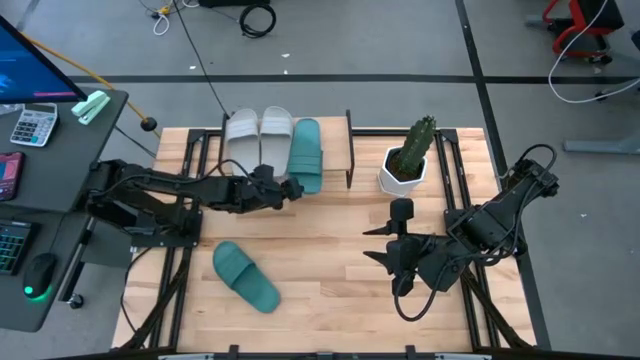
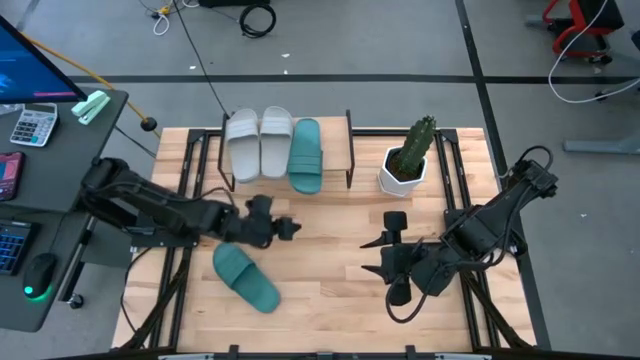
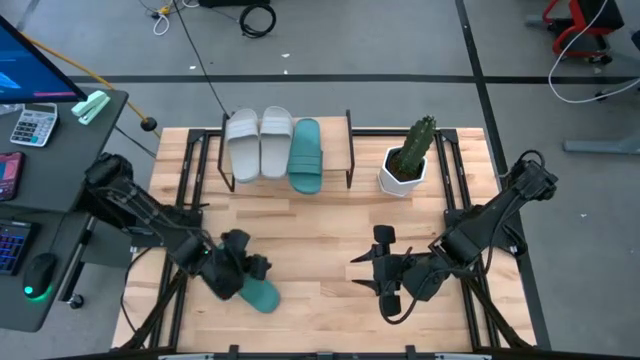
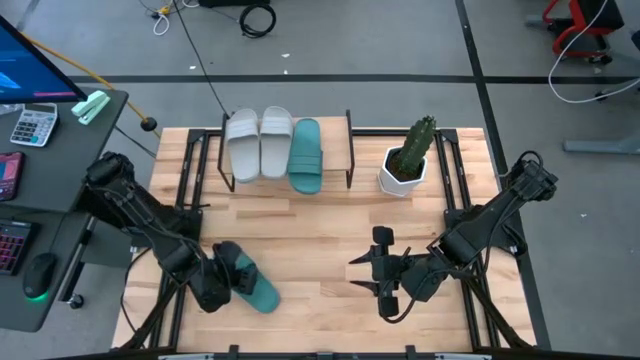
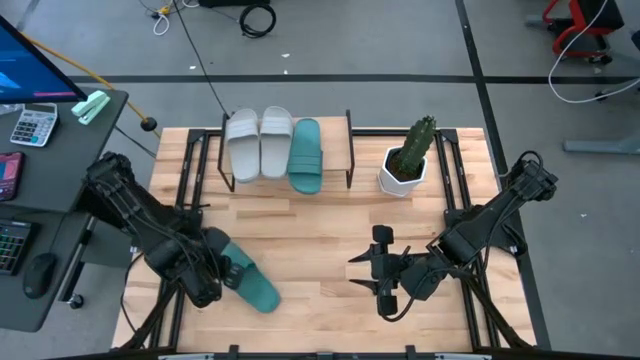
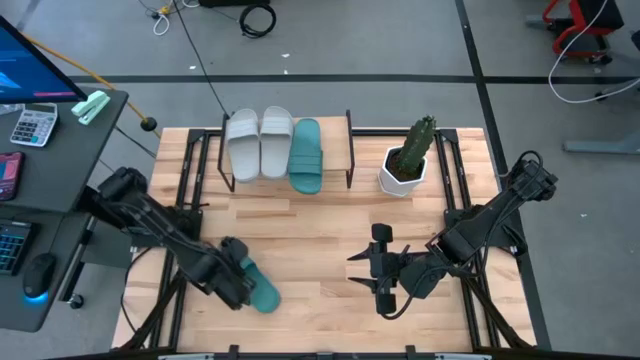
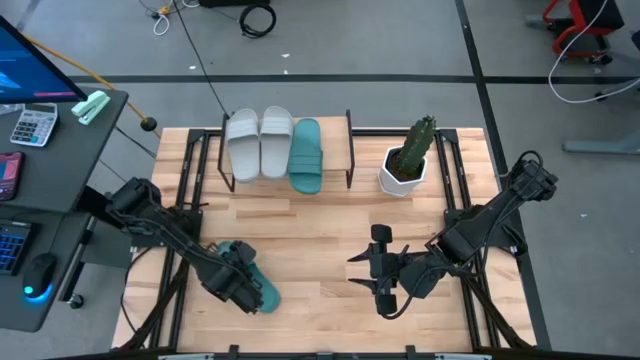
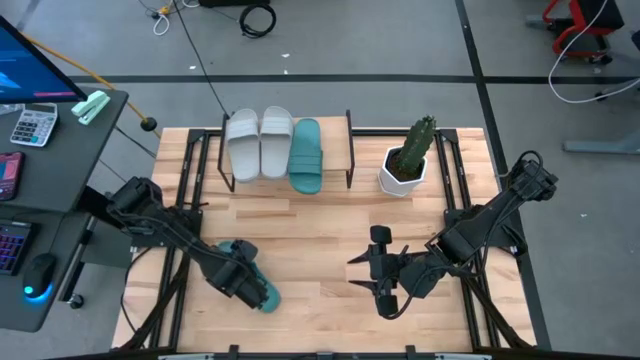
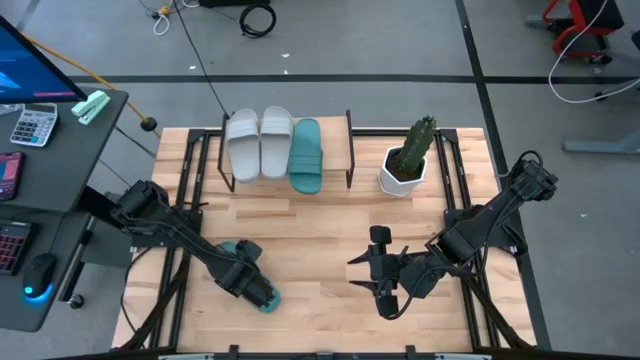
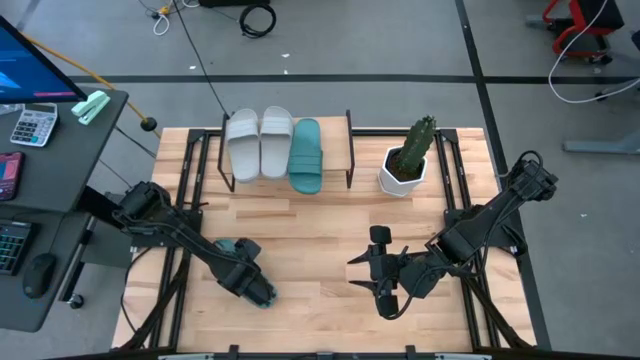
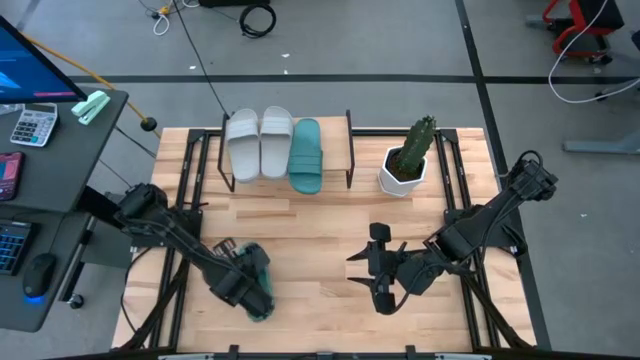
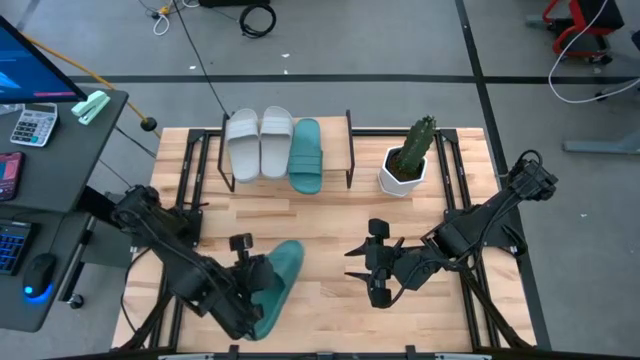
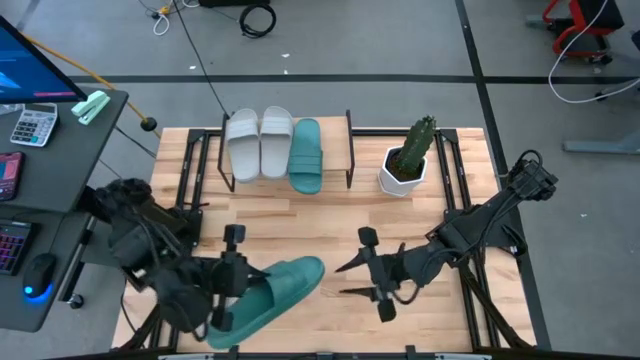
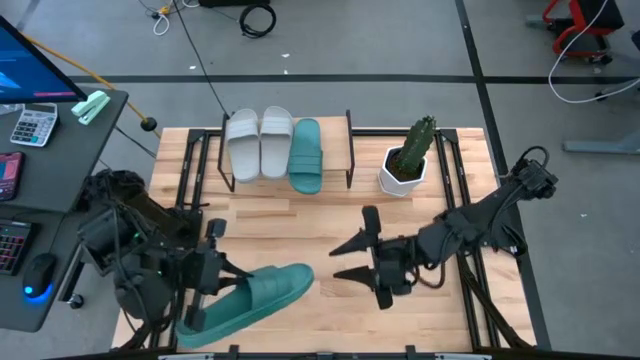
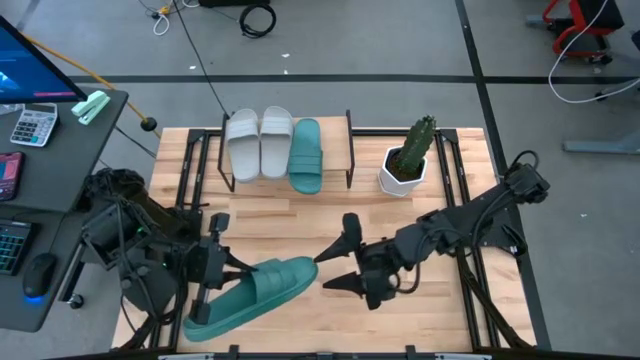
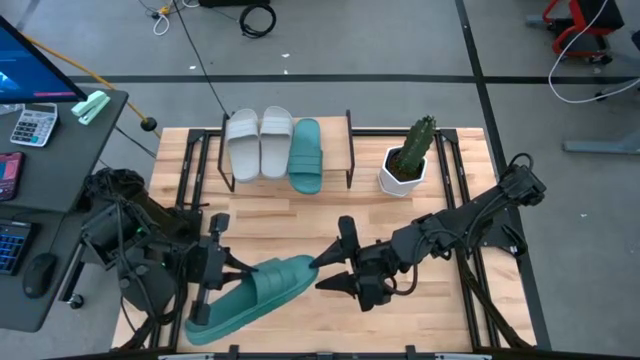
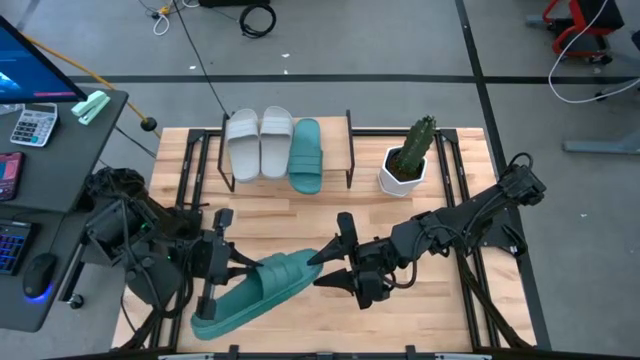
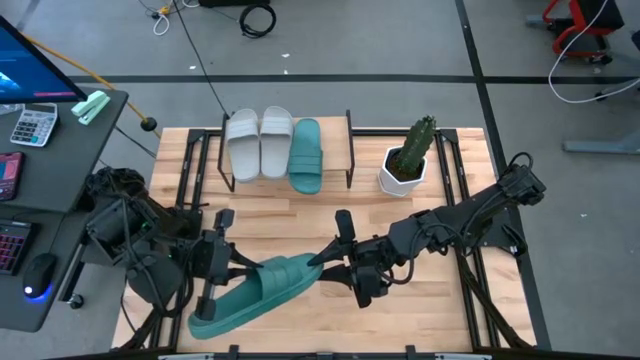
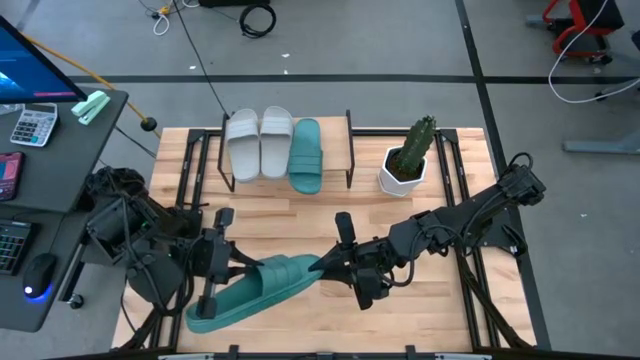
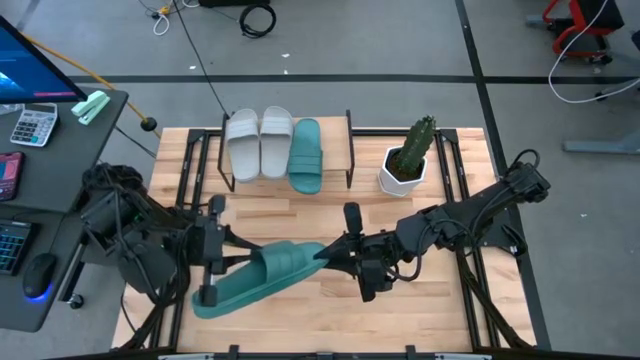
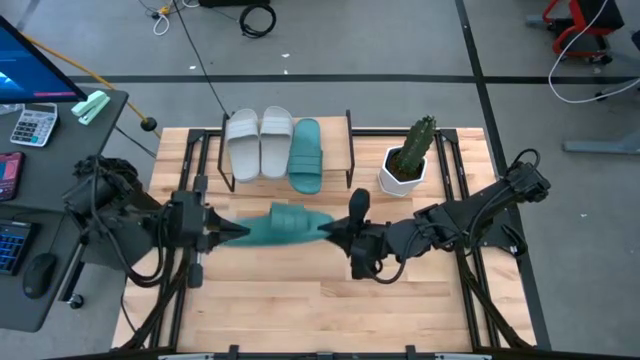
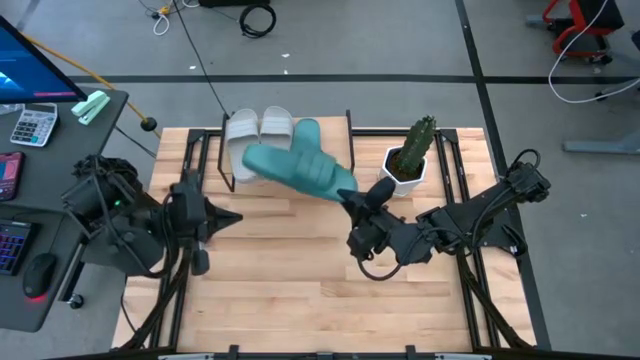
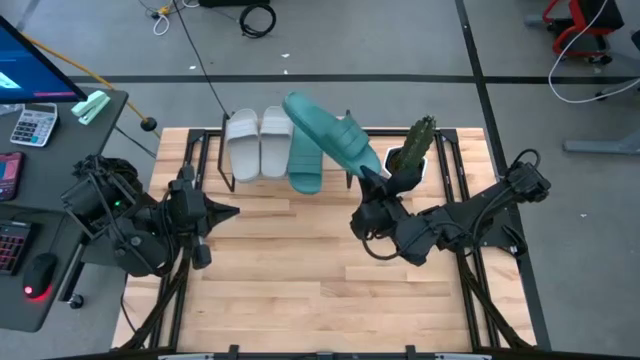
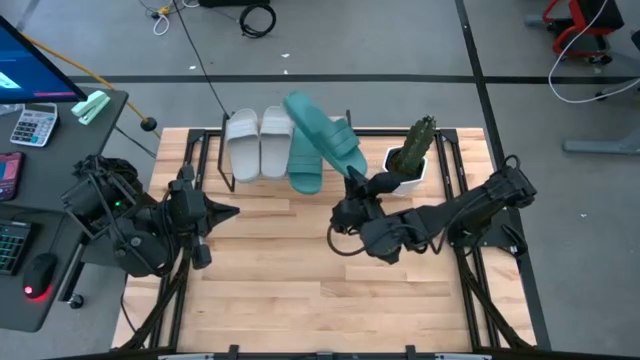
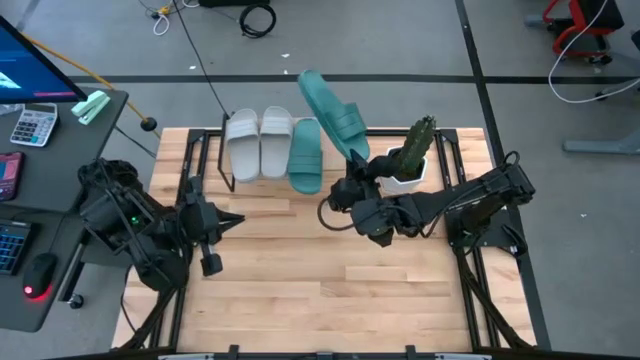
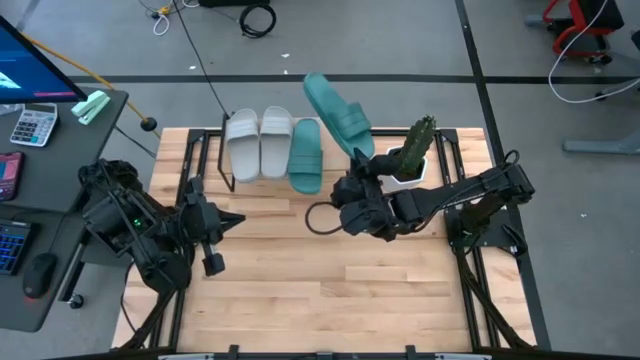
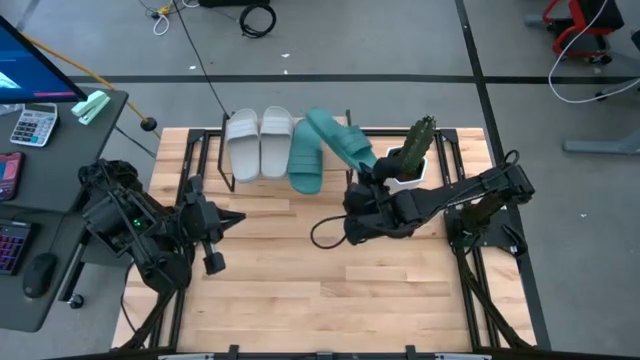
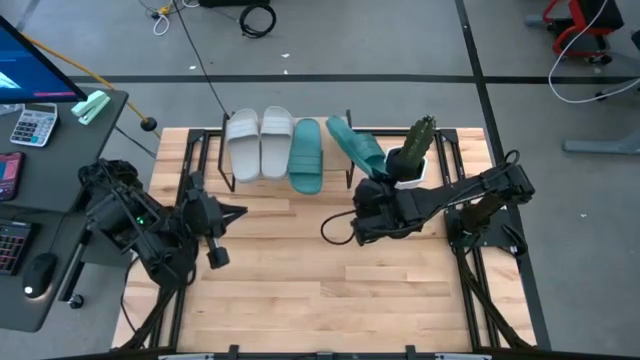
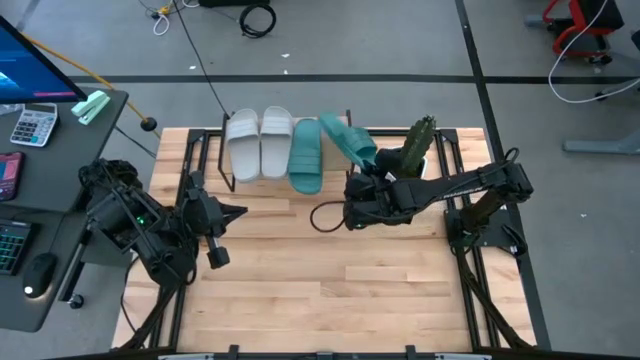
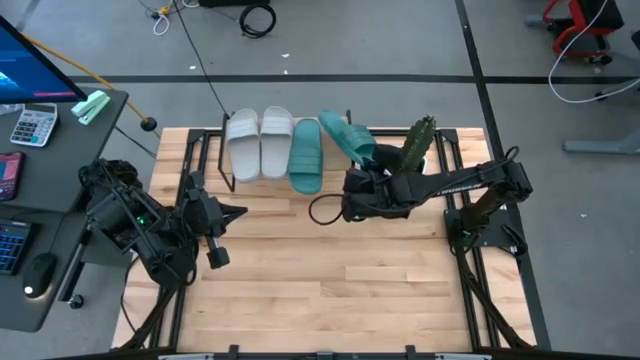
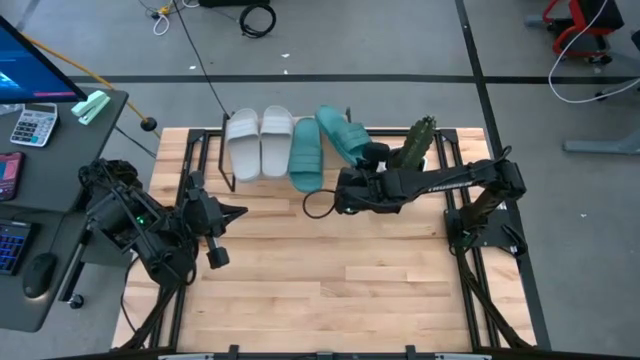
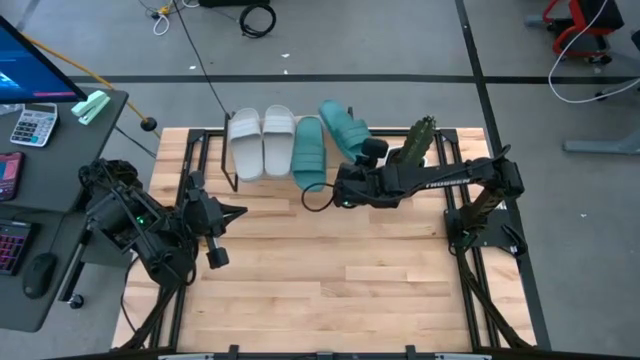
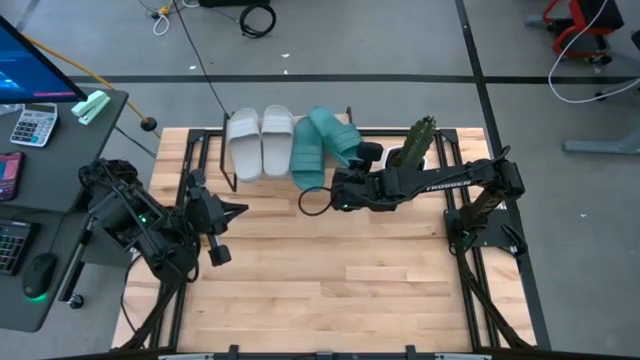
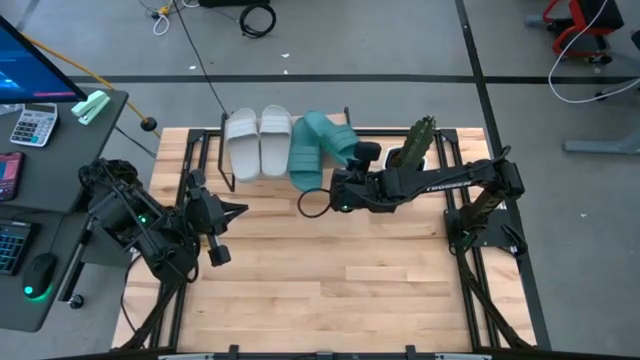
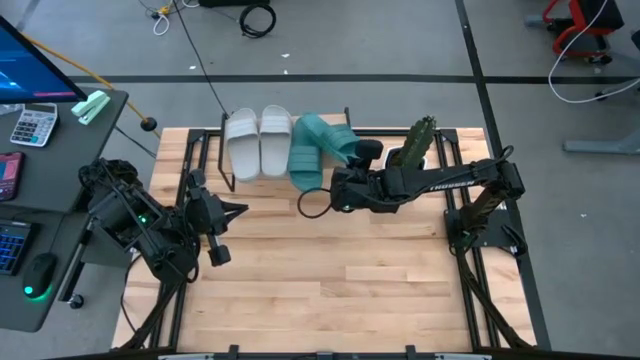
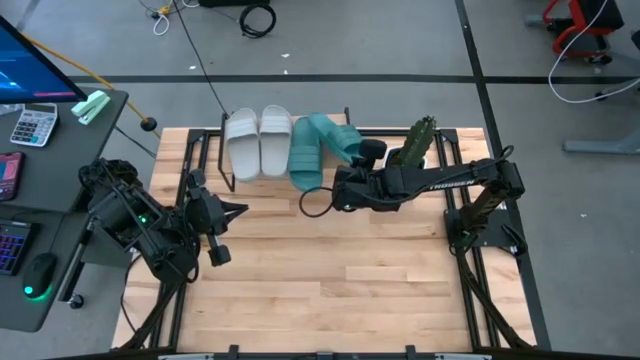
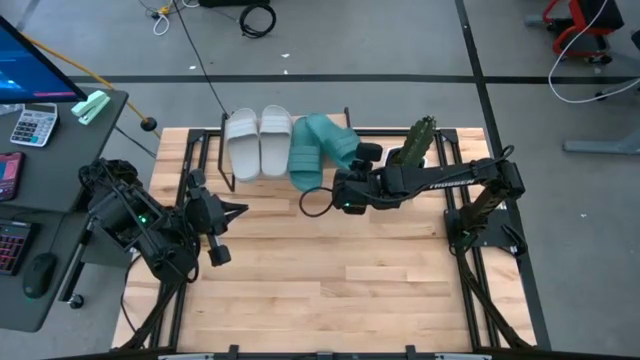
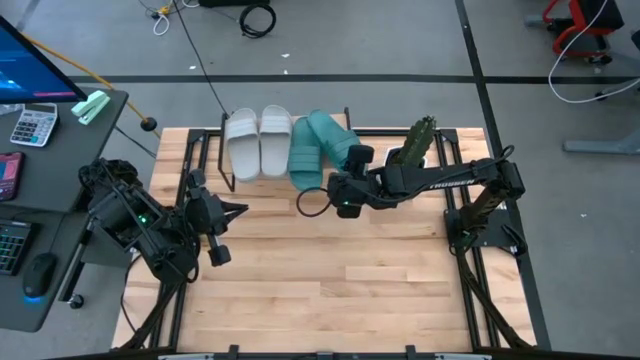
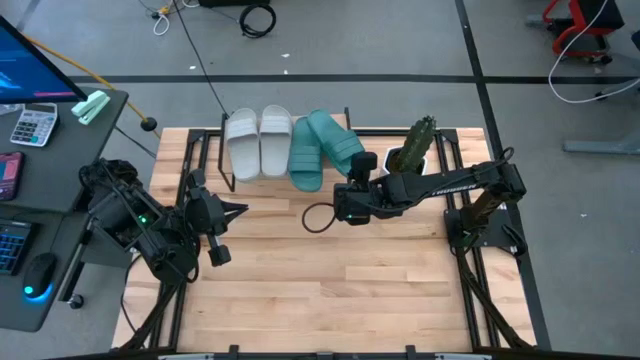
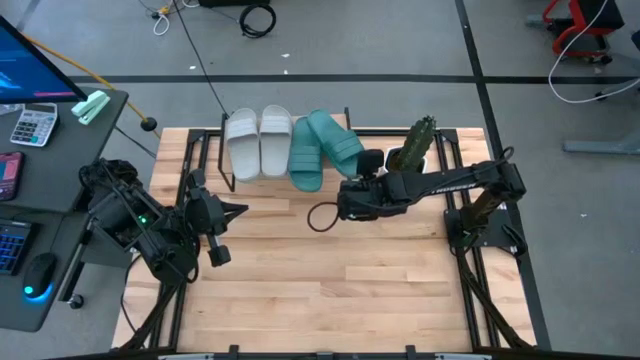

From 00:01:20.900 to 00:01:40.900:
Task: Pick and place slides into the shelf
Put the left green slipper on the shelf

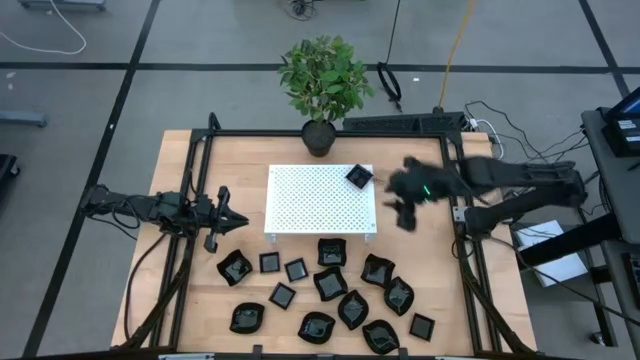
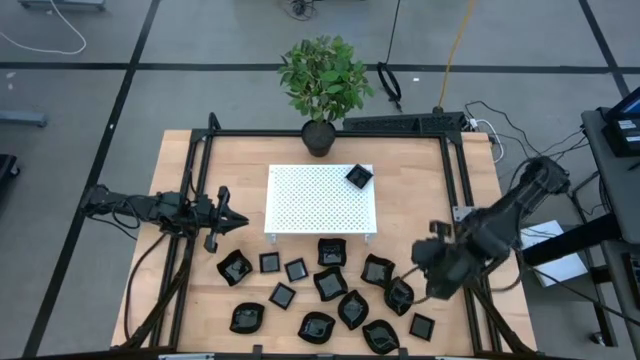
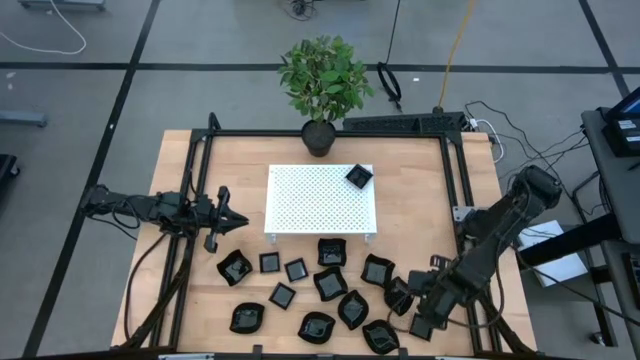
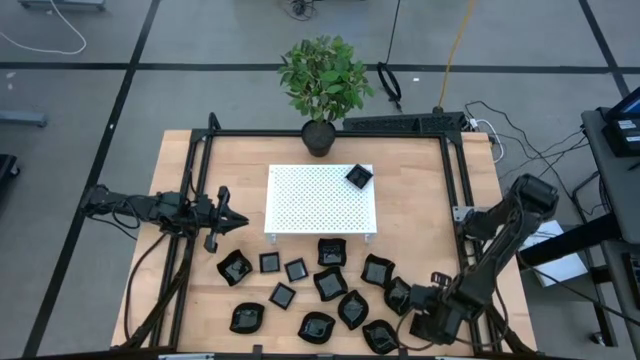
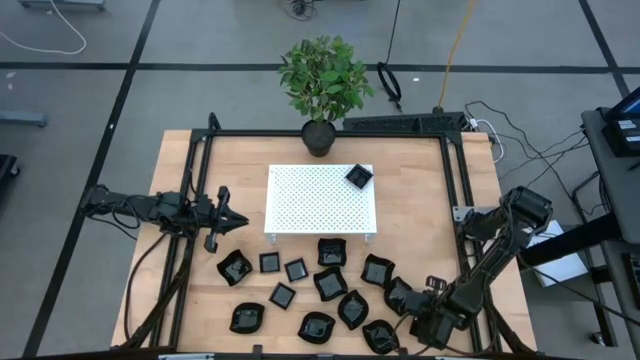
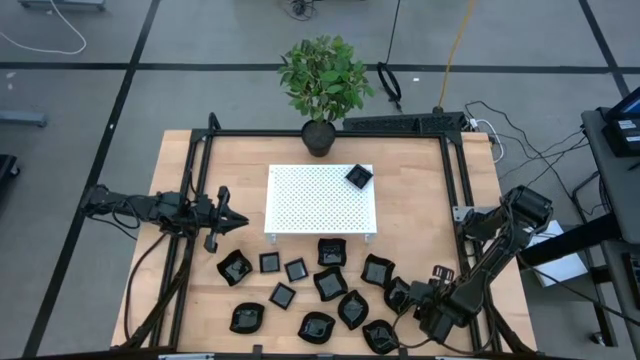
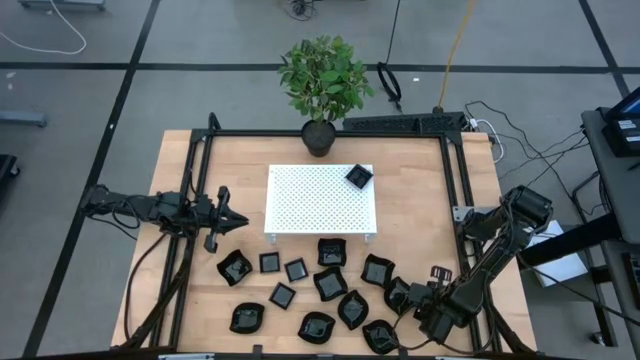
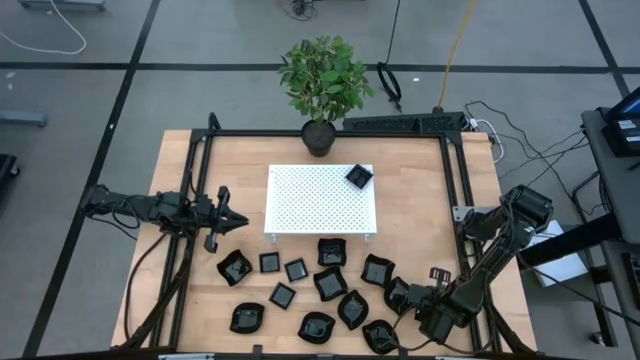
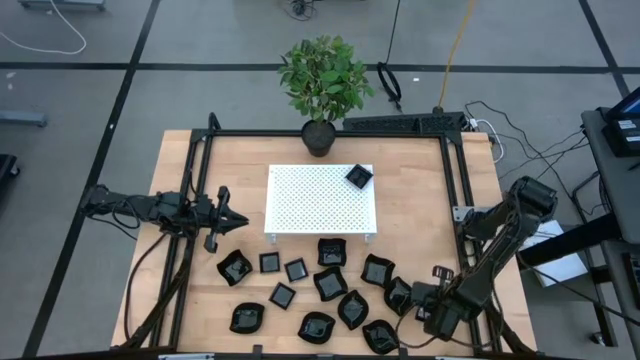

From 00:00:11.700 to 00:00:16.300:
Task: Pick & Place Mini shaped plates
Stack the black square plate on top of the black square plate on the shelf
